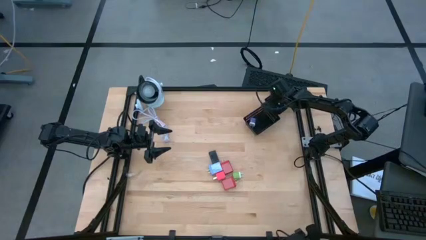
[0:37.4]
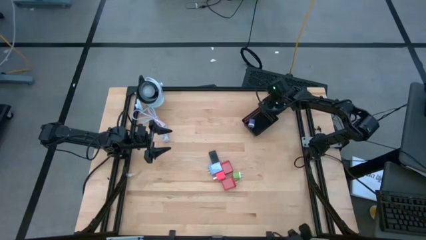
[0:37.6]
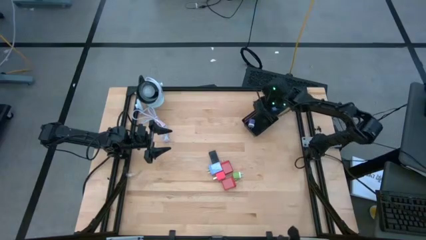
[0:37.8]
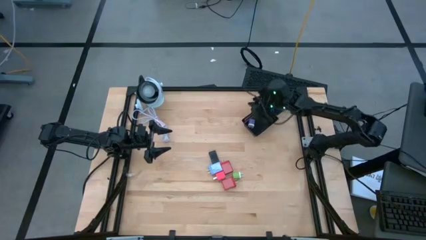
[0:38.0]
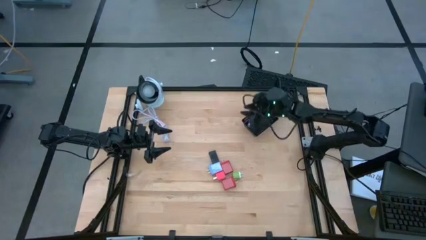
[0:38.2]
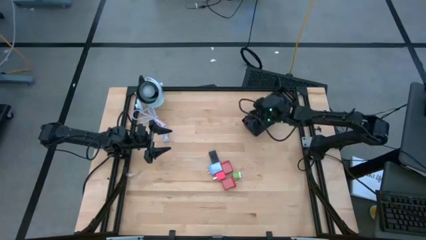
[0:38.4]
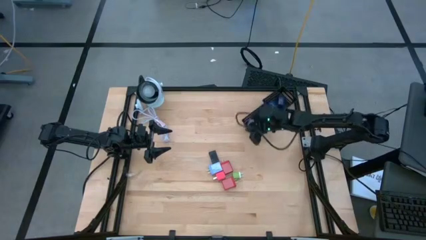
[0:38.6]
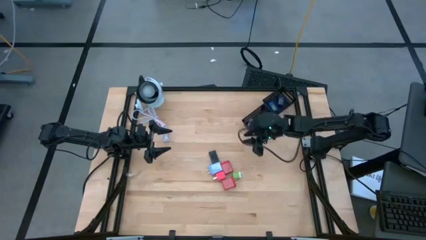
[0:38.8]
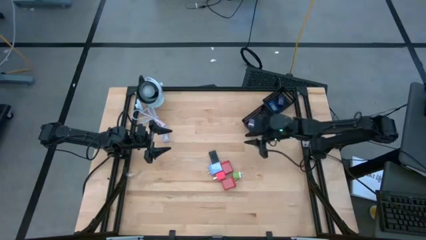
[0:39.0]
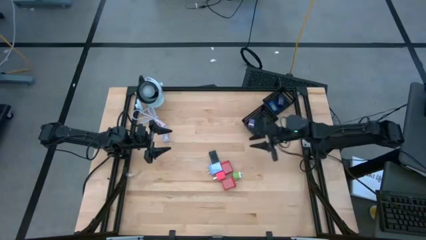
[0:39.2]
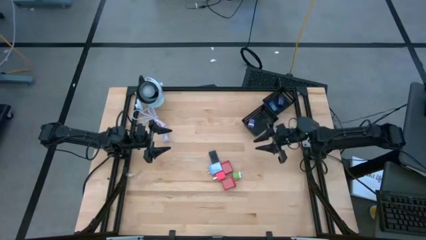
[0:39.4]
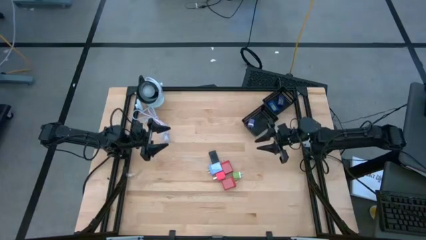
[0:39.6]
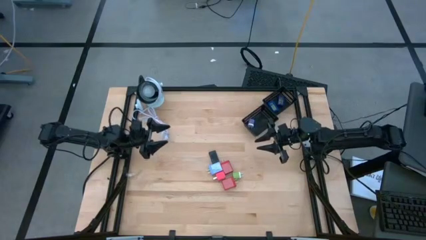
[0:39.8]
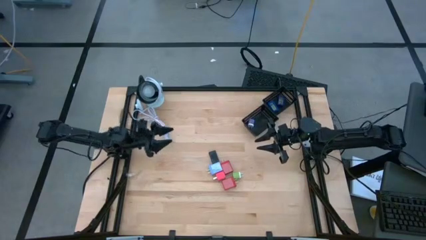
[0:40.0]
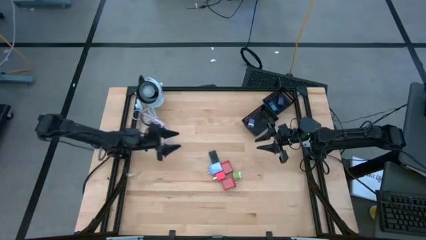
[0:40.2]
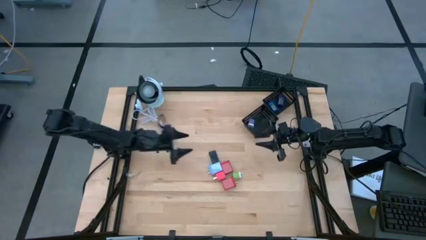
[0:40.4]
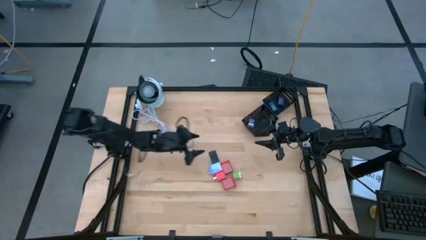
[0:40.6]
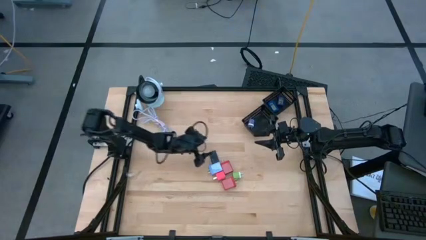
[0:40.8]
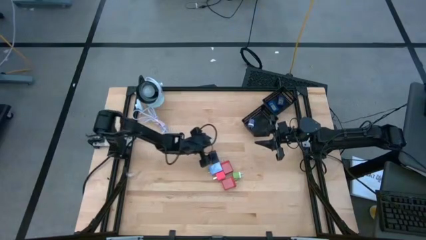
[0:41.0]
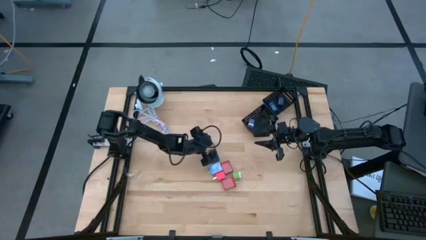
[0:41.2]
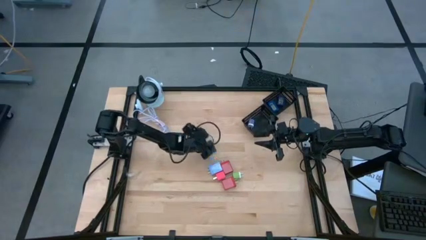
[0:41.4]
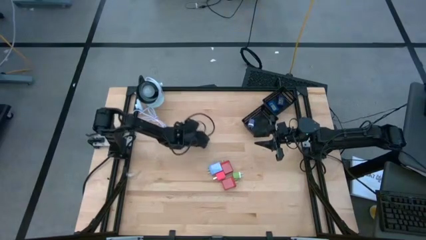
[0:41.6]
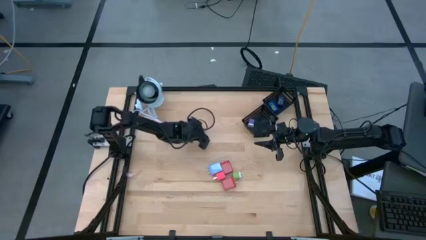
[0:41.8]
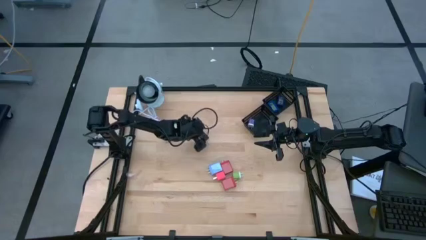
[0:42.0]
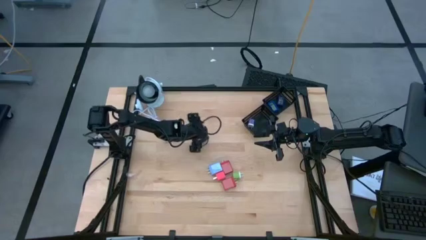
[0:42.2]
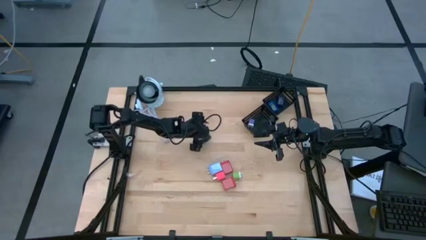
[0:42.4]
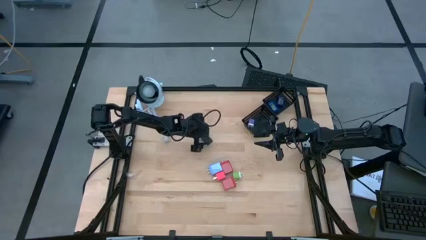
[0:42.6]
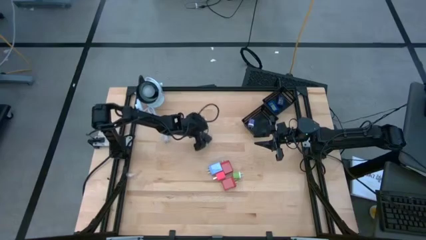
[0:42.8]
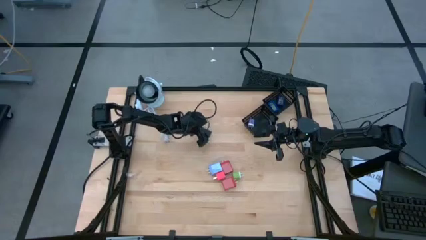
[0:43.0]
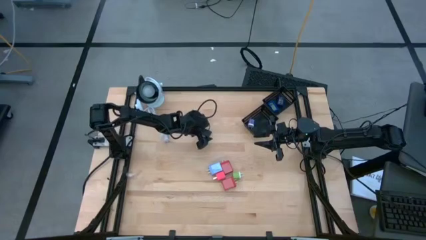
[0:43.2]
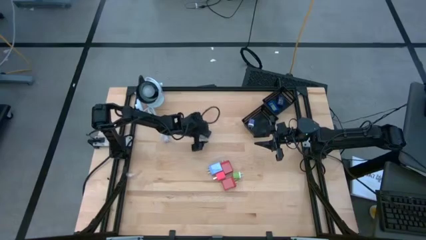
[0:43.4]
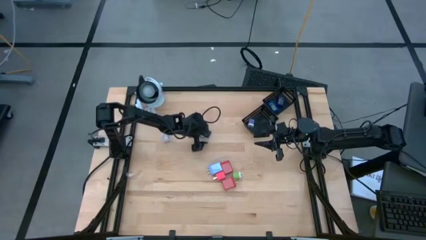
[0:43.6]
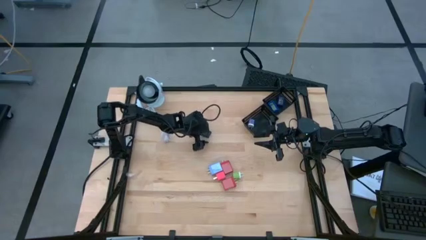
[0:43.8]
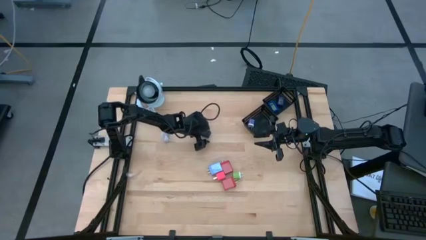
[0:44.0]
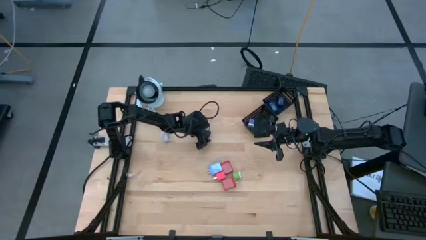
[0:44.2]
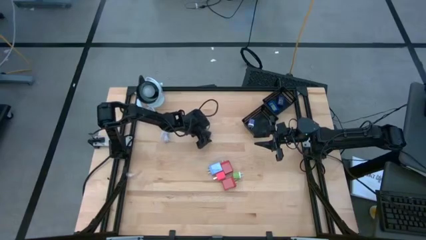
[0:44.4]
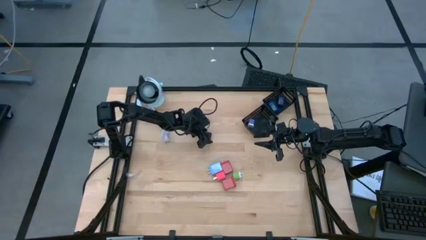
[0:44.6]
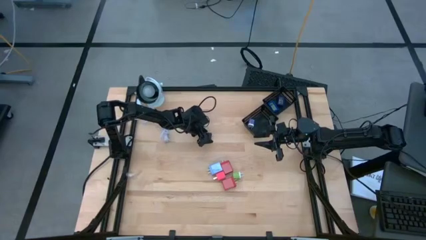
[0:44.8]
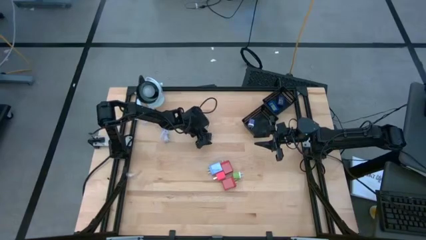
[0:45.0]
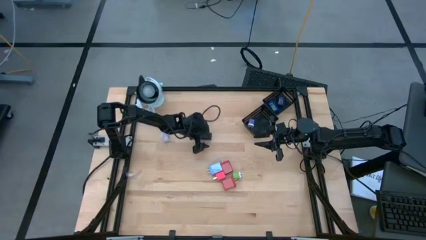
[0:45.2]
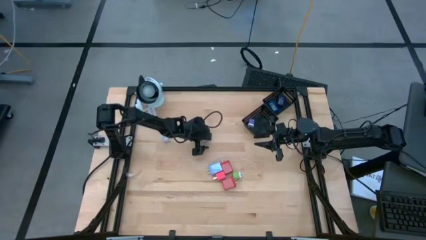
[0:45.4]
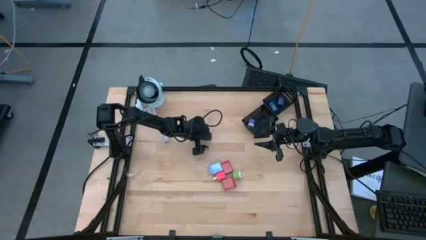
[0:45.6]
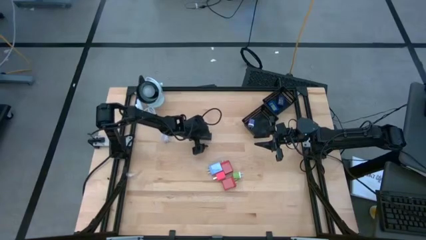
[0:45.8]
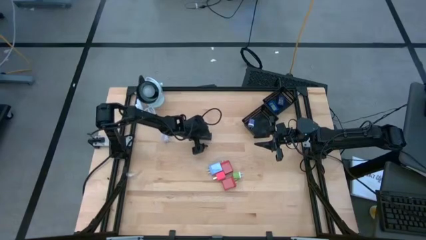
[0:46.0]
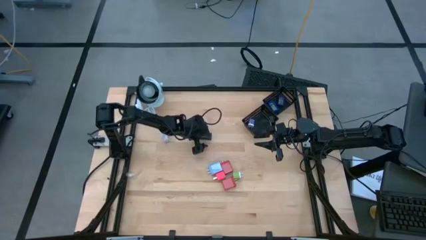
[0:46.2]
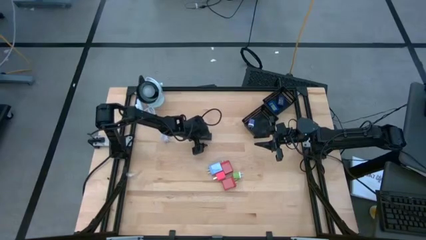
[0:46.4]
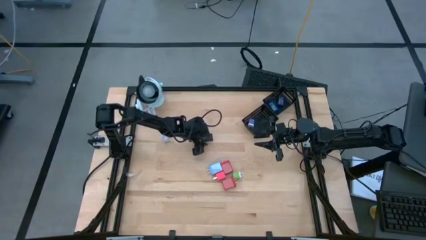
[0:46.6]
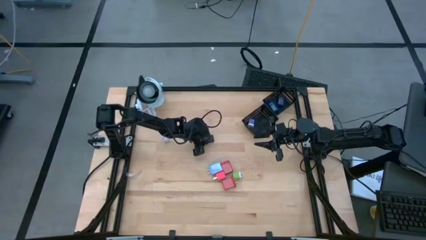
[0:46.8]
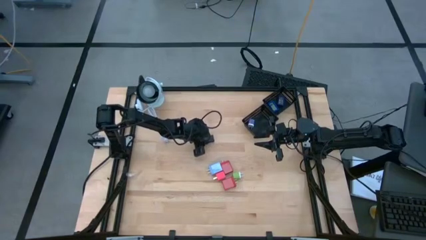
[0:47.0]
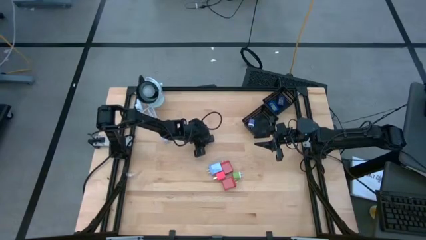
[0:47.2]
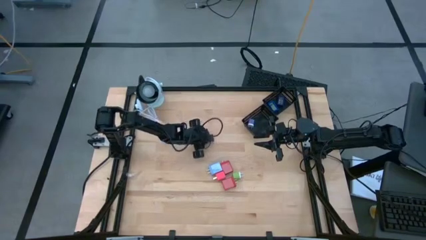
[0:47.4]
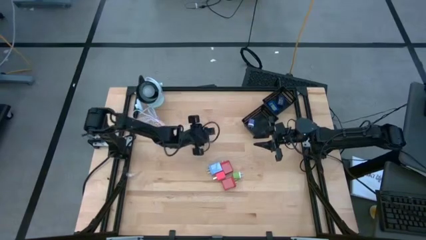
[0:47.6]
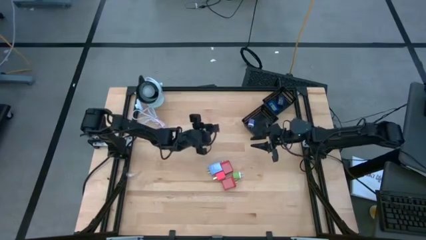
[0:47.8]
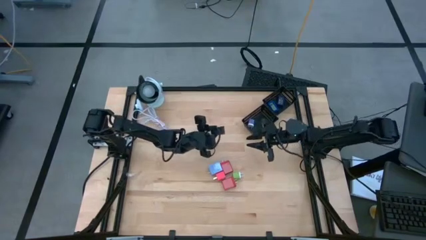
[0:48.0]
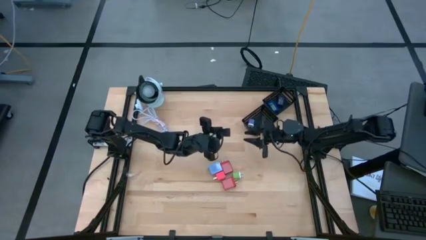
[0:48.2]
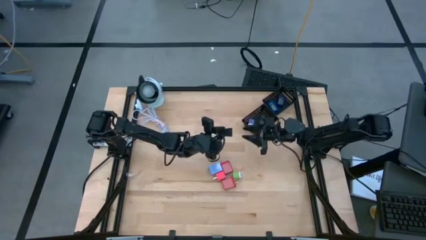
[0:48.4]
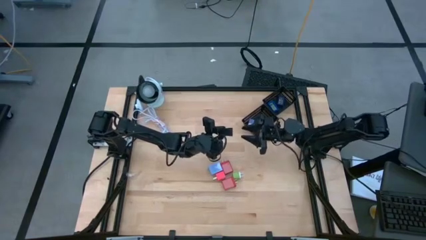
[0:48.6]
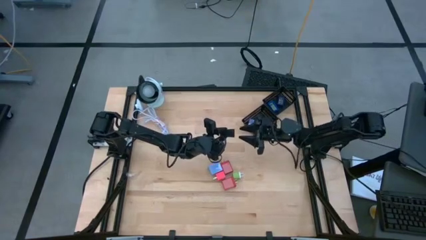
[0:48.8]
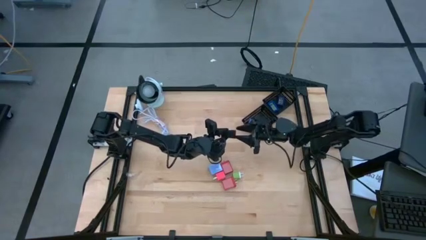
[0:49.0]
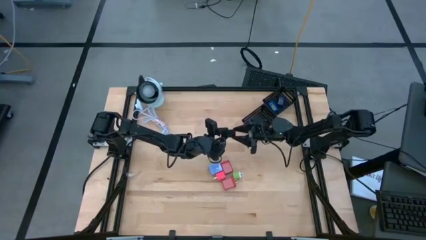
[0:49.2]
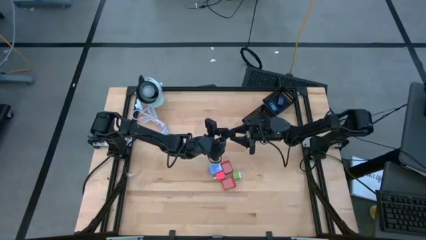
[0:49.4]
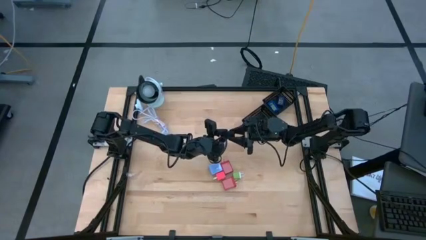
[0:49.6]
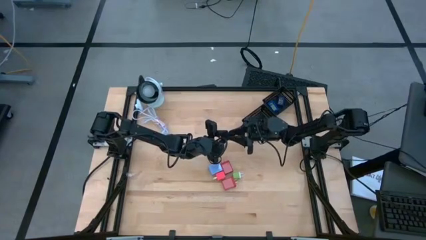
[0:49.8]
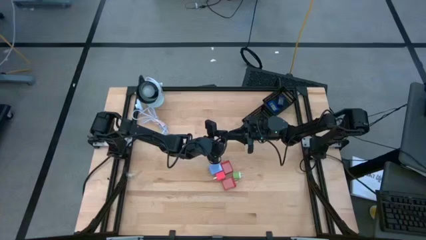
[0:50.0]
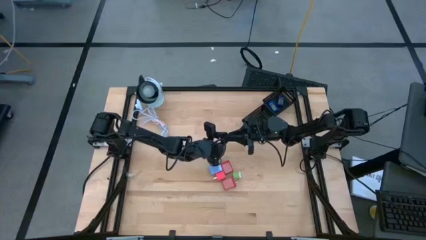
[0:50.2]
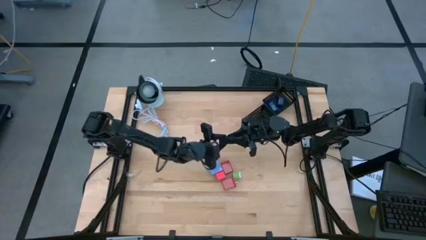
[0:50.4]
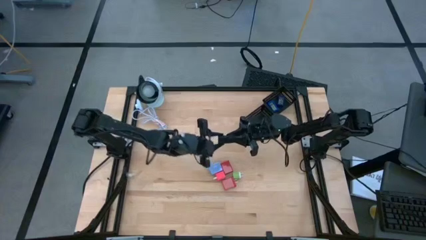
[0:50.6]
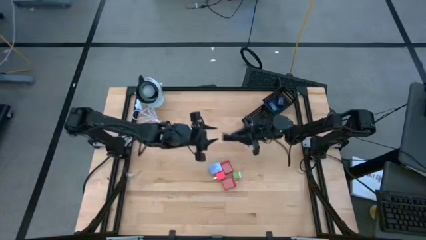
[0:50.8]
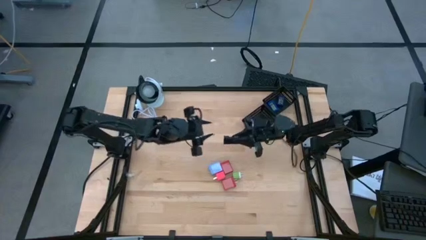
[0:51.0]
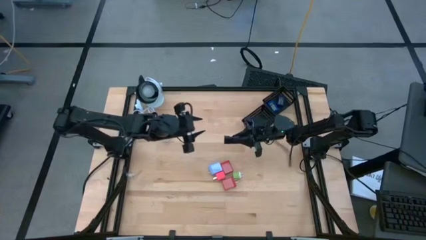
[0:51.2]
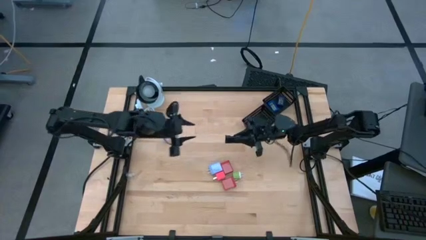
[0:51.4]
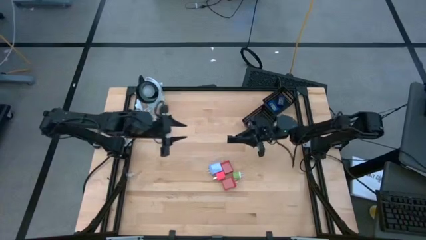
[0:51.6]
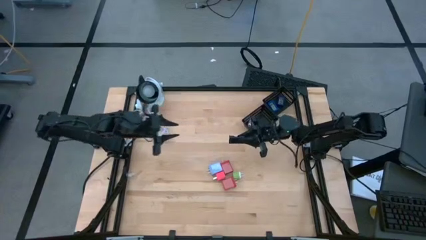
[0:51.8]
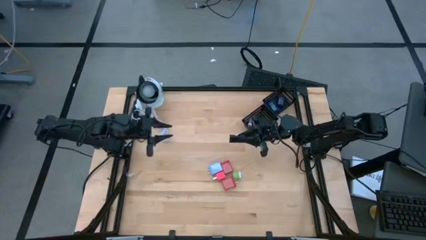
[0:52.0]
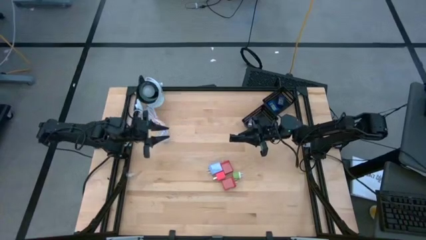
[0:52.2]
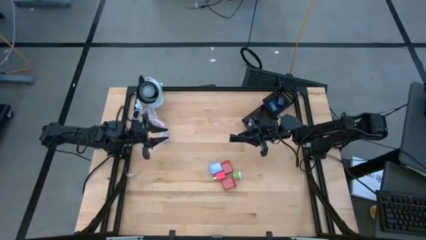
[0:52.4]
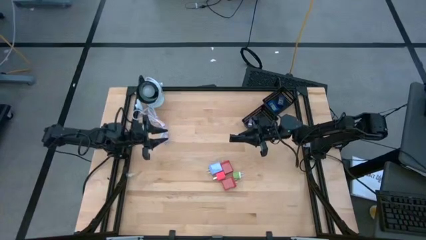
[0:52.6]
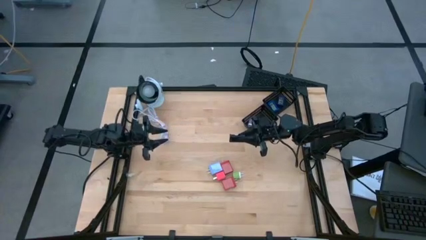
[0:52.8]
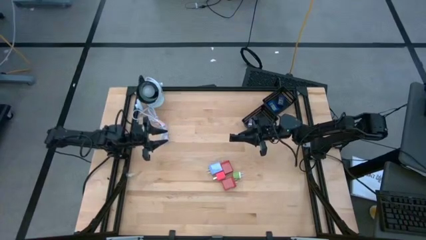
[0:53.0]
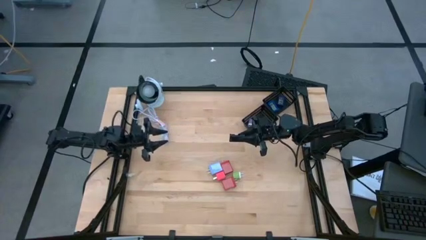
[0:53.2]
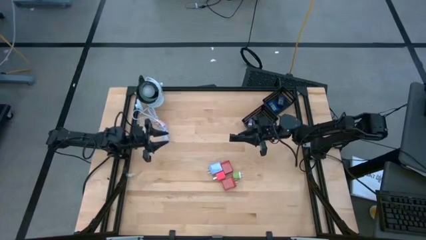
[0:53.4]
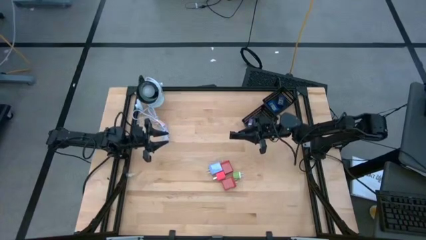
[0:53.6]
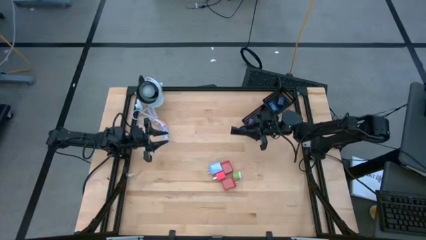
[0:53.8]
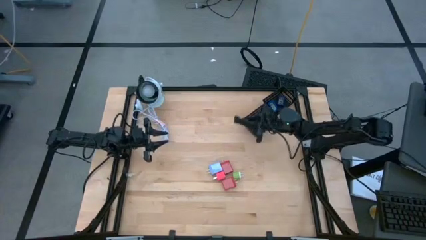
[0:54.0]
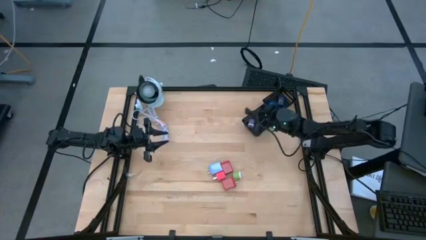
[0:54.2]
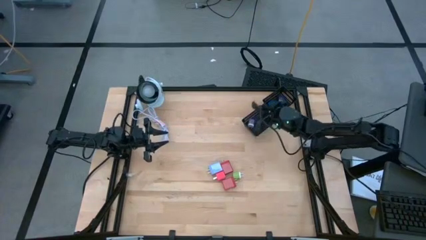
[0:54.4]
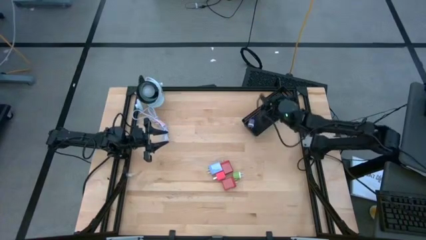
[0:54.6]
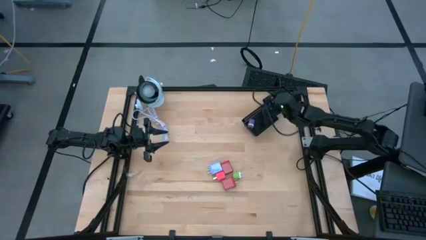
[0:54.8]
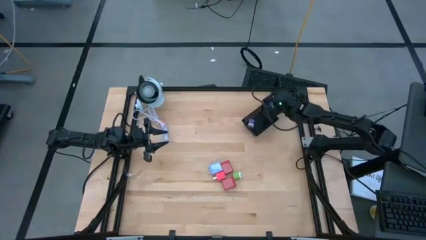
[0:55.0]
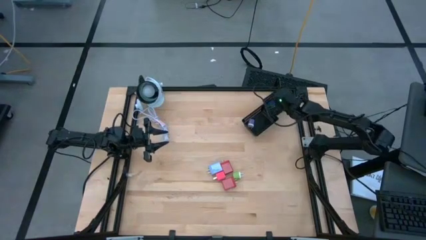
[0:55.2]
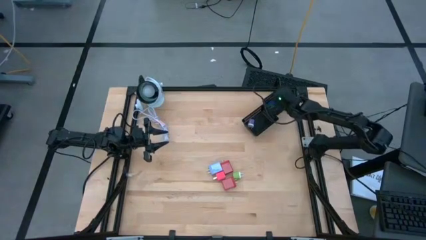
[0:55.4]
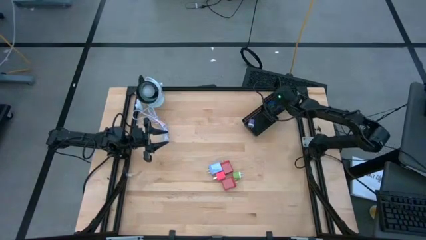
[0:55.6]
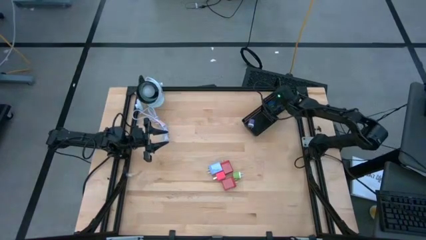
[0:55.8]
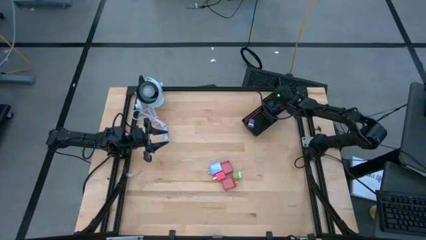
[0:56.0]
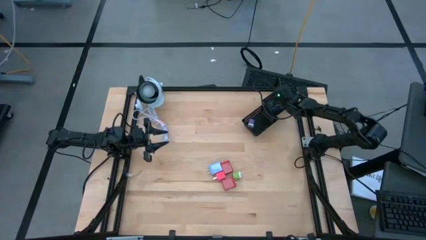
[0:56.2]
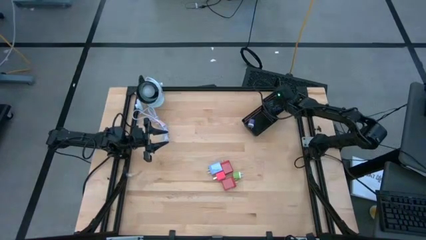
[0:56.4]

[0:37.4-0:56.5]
Task: Pick & Place Office items
Put the black digital timer into the top black bin
